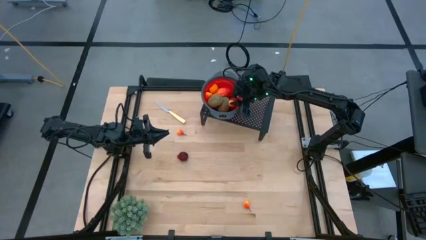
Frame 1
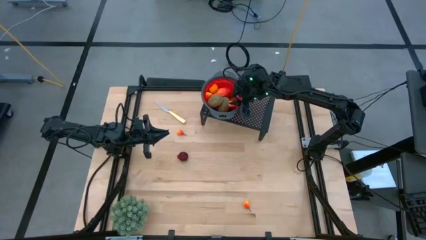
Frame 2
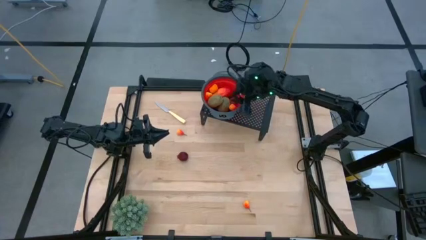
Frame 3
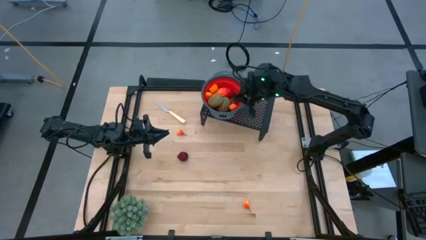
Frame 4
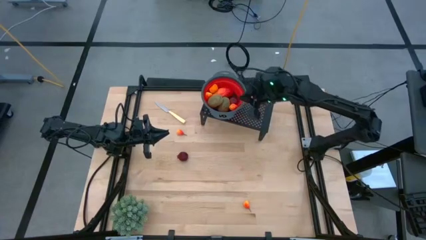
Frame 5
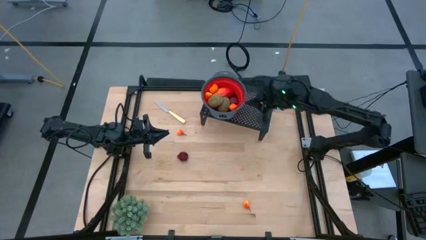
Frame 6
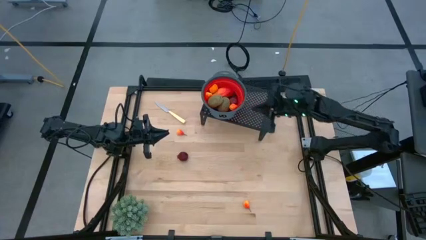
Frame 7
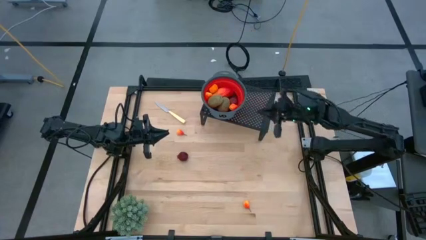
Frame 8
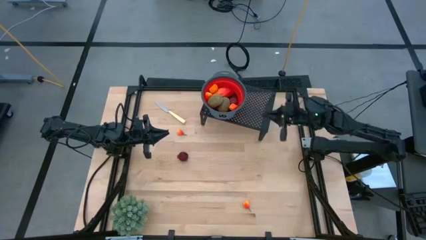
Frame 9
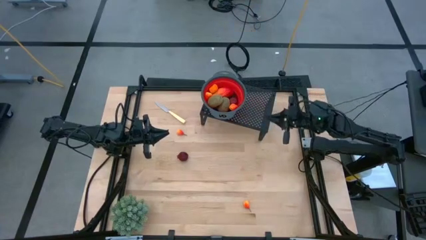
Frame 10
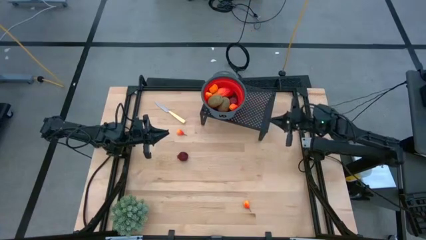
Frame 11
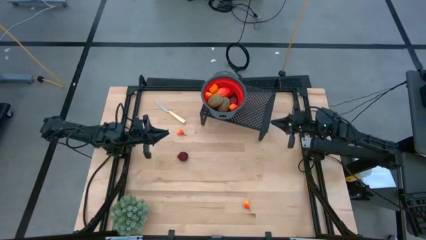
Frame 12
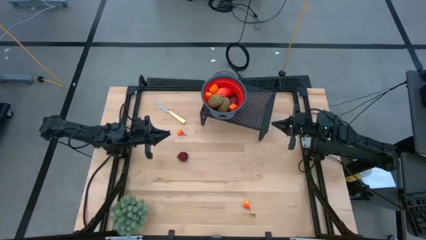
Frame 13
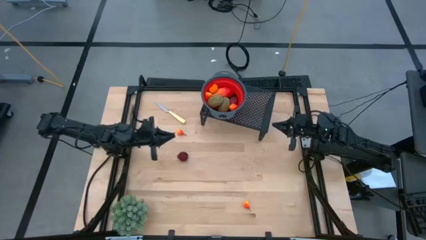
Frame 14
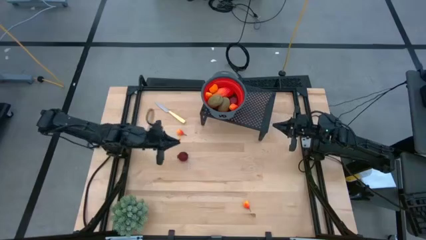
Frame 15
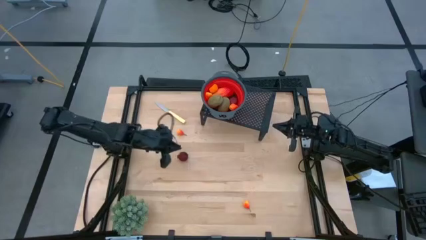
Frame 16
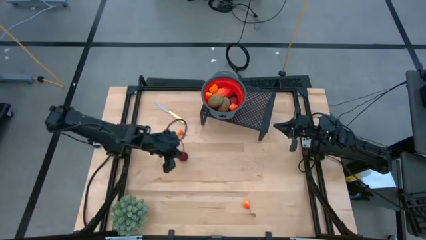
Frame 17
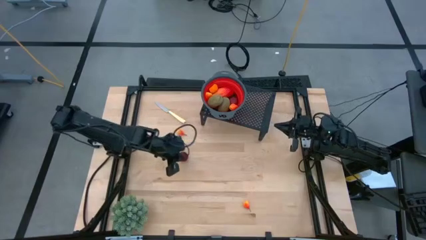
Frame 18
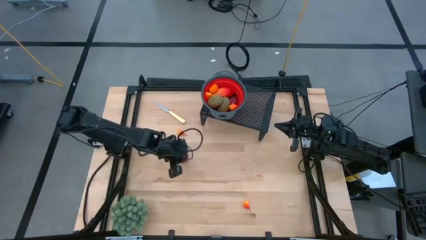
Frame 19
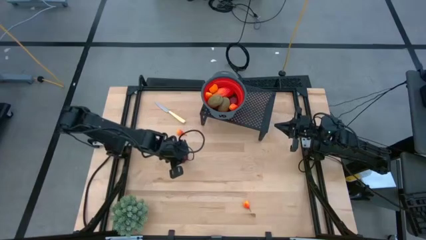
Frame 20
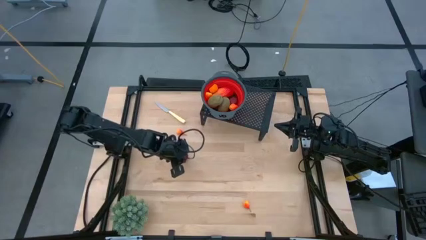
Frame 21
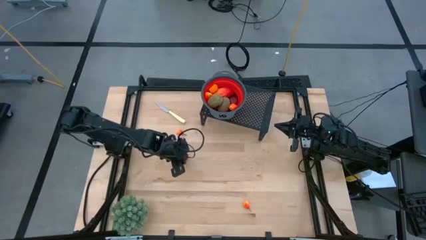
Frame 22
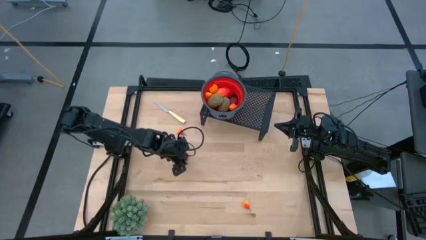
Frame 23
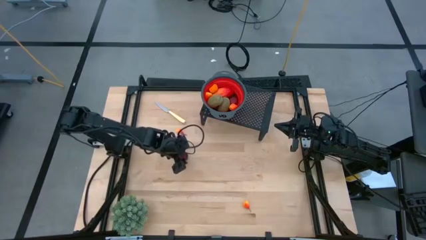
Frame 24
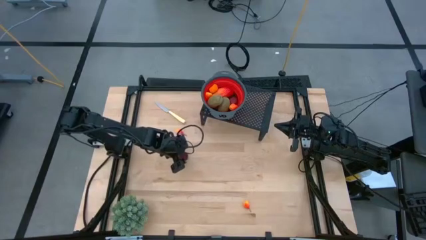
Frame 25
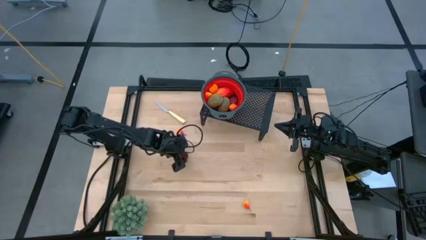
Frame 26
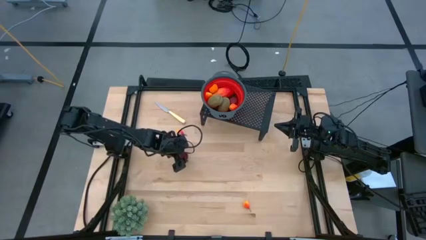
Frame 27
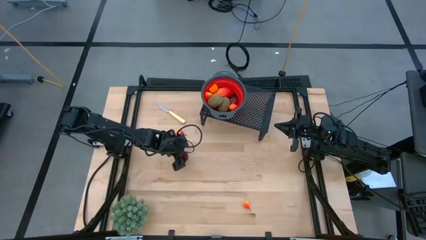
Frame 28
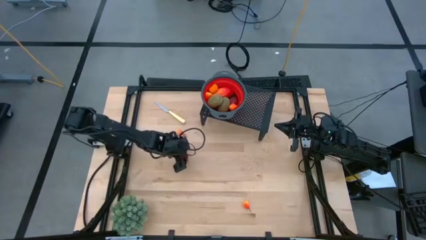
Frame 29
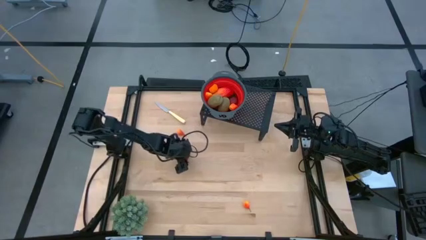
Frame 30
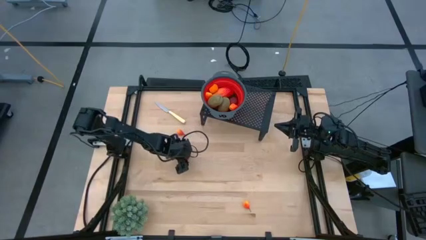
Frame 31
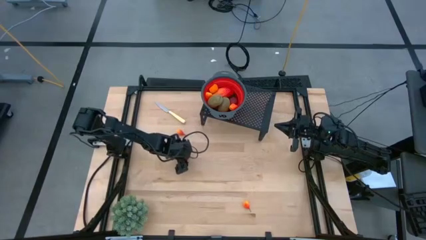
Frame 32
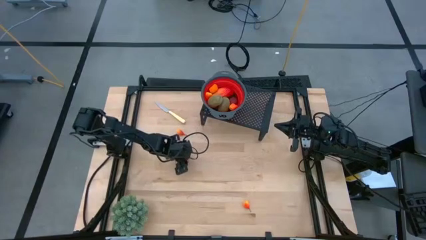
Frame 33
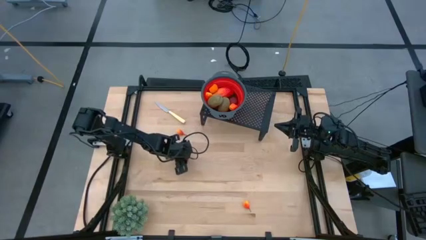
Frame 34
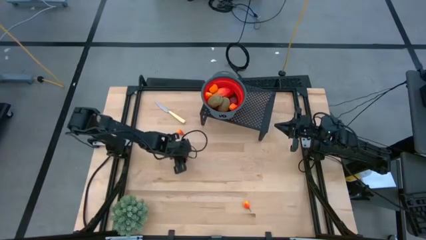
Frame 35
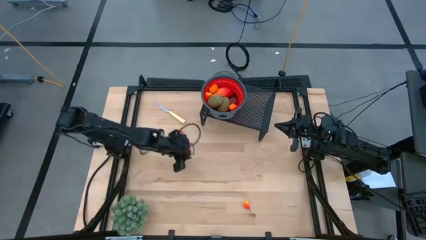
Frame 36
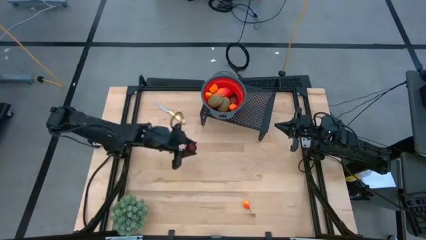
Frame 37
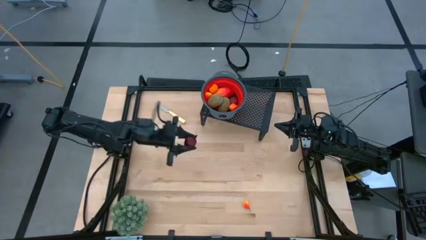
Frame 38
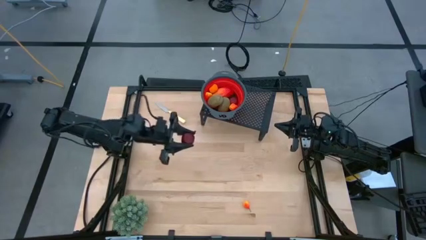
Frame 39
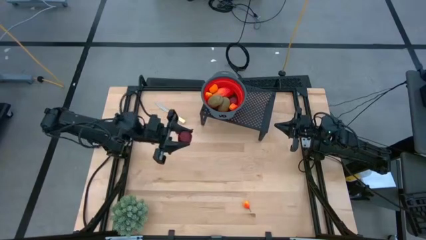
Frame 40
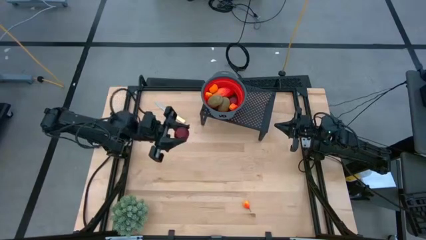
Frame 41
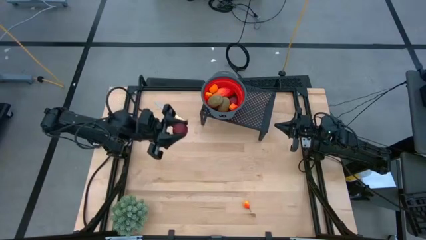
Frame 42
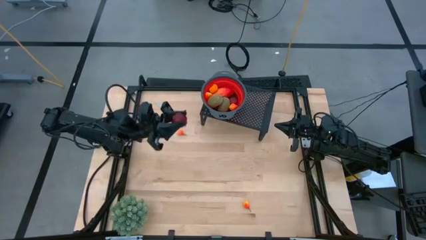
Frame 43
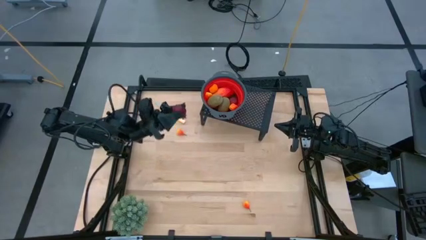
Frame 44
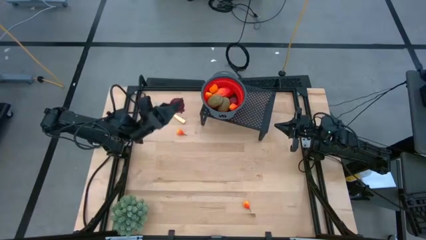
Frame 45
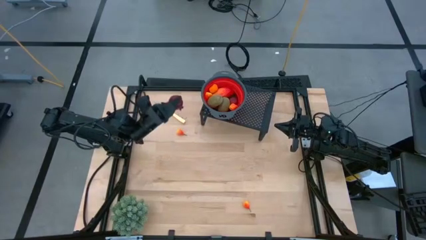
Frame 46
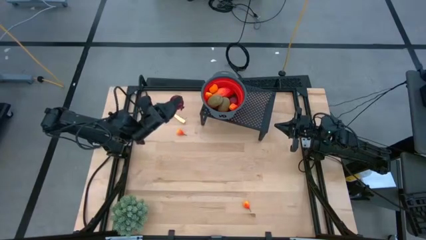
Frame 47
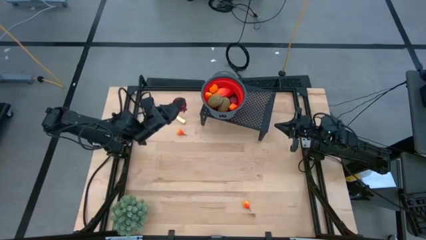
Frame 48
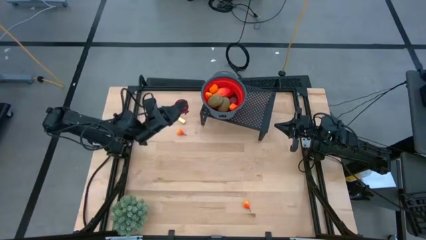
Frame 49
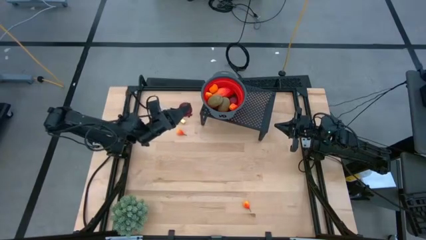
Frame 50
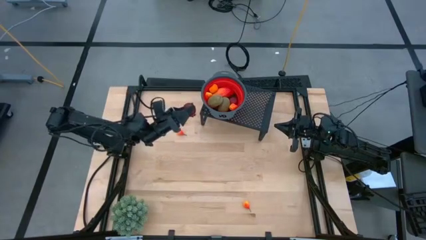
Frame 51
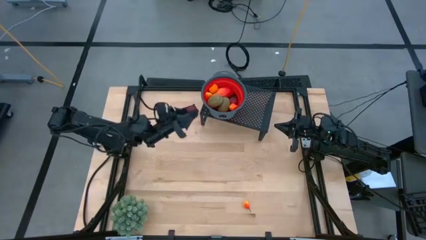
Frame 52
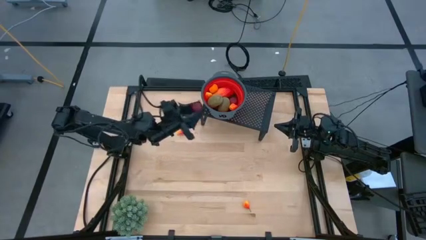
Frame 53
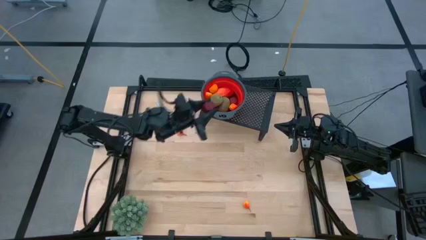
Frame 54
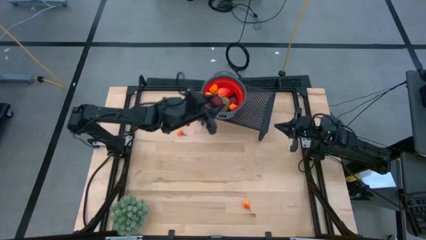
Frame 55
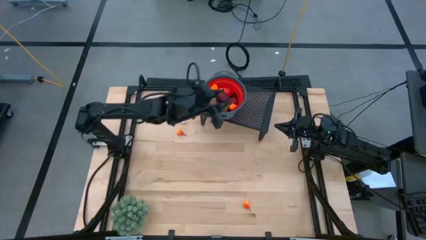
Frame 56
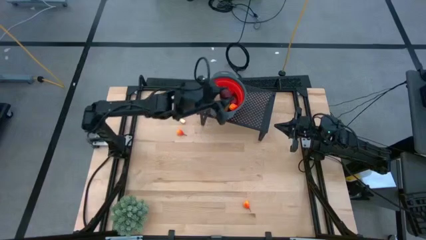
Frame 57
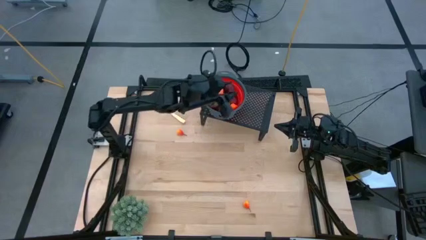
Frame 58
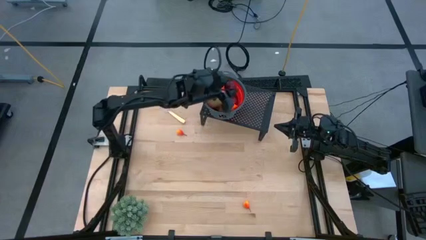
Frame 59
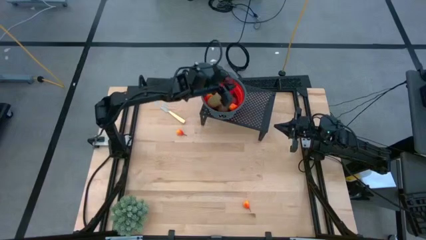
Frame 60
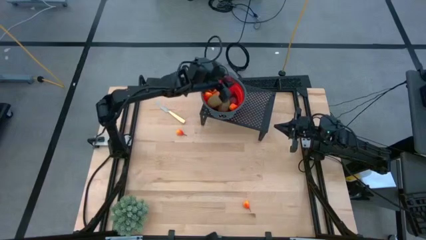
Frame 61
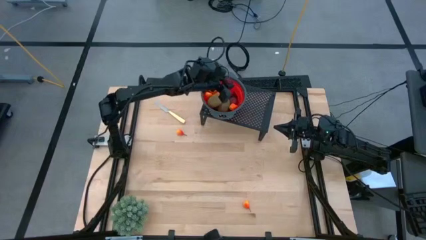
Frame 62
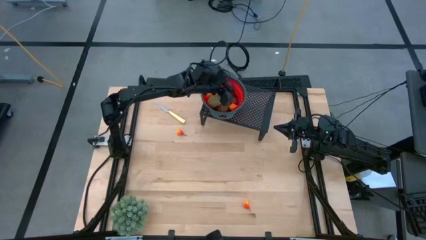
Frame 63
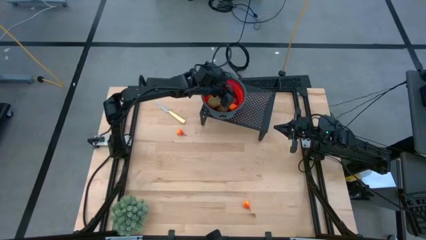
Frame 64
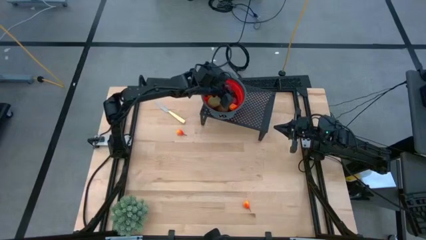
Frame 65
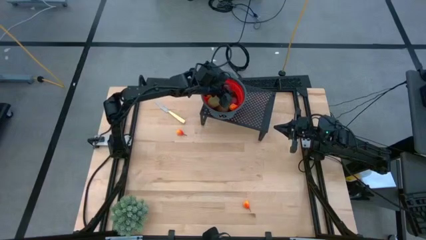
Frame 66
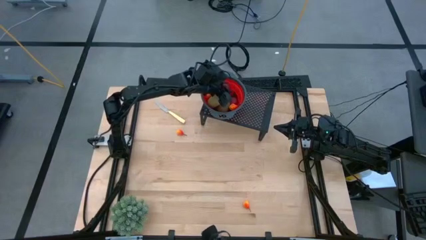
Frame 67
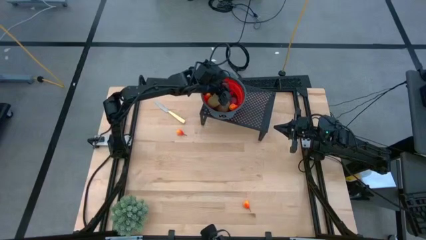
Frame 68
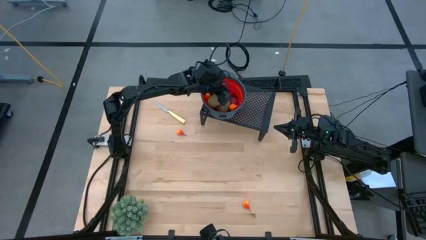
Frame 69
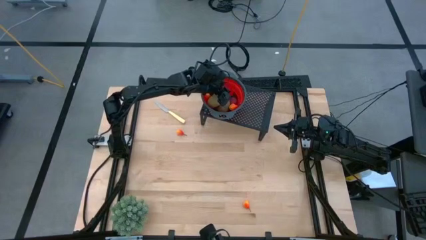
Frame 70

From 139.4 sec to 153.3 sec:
Task: Pick & Place Fruit
Put the pomegranate into the strainer bowl on the shelf
